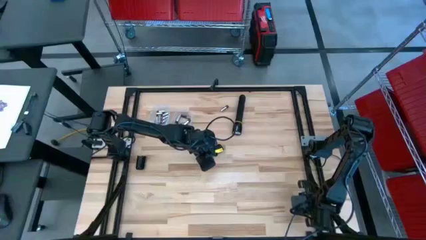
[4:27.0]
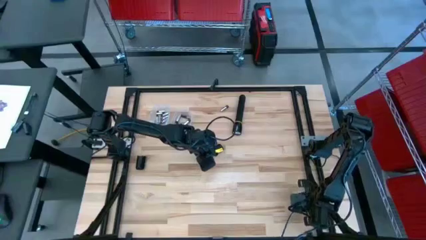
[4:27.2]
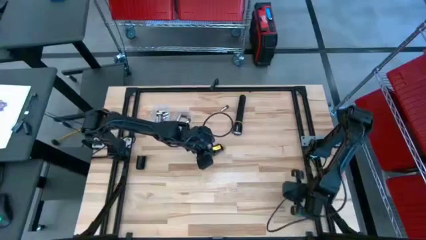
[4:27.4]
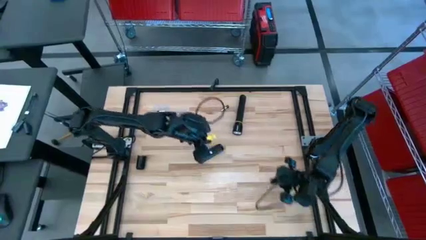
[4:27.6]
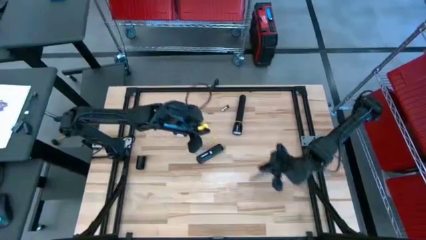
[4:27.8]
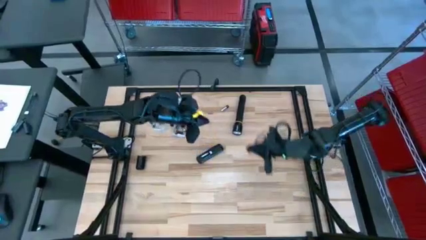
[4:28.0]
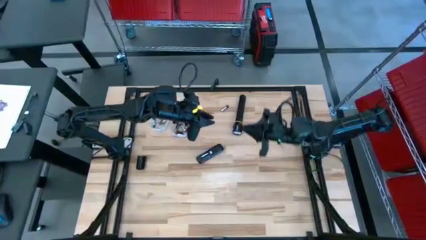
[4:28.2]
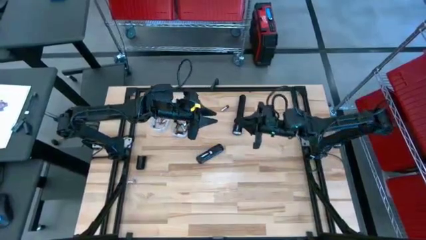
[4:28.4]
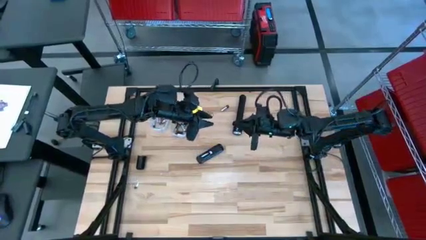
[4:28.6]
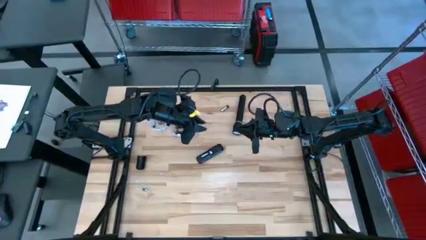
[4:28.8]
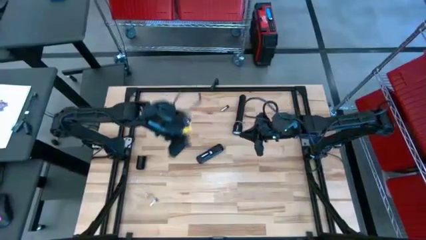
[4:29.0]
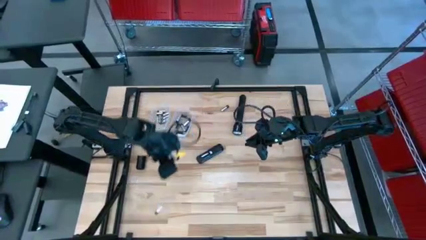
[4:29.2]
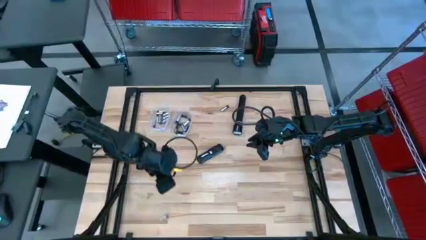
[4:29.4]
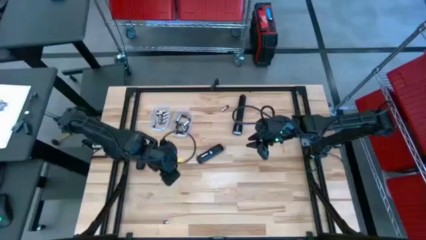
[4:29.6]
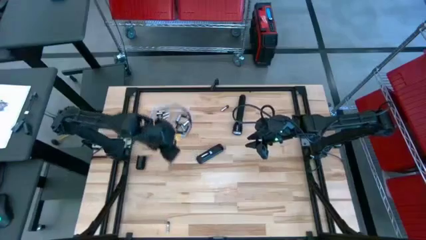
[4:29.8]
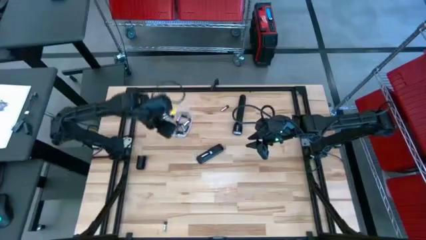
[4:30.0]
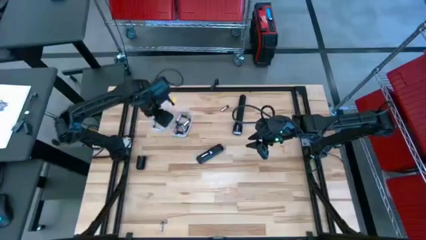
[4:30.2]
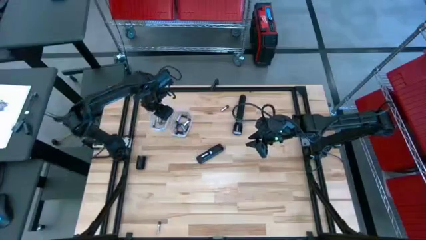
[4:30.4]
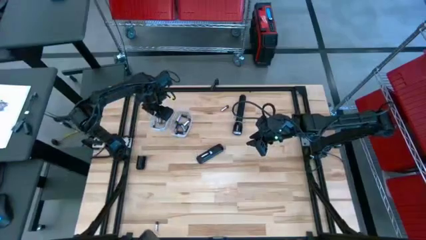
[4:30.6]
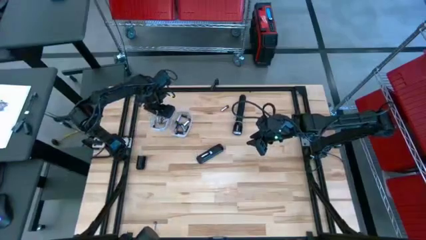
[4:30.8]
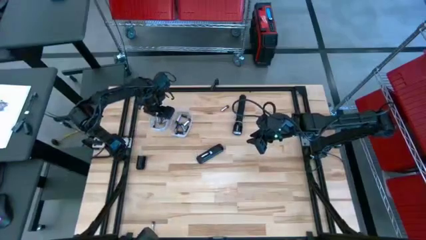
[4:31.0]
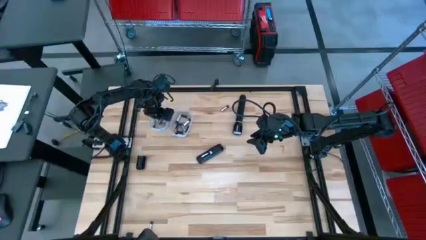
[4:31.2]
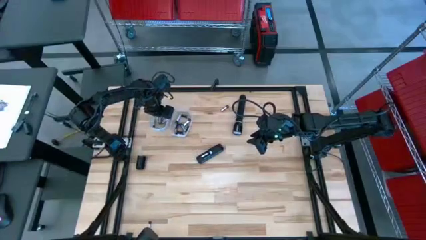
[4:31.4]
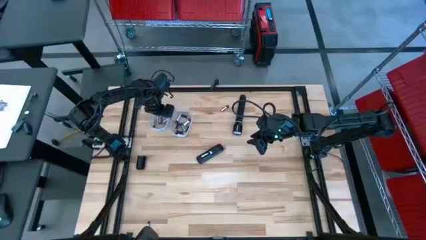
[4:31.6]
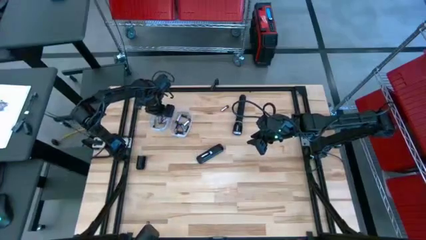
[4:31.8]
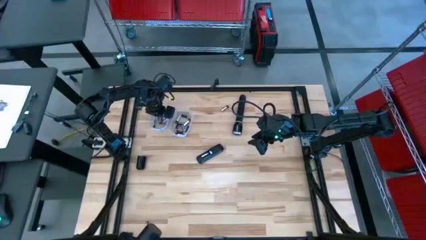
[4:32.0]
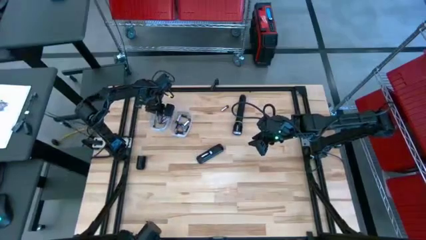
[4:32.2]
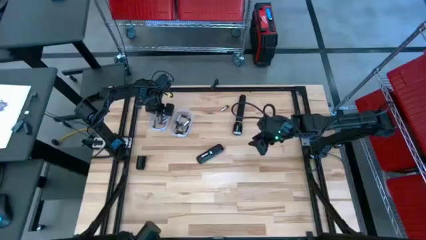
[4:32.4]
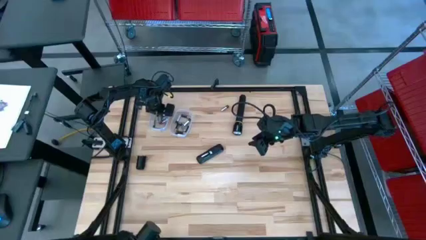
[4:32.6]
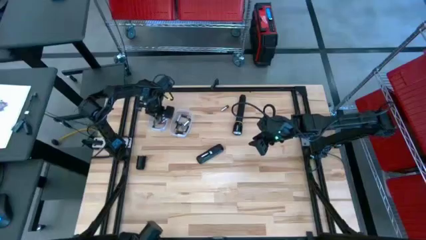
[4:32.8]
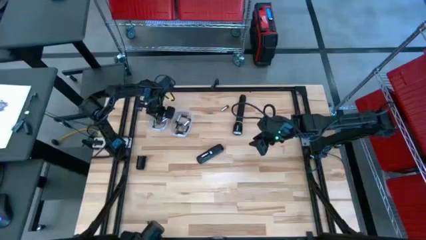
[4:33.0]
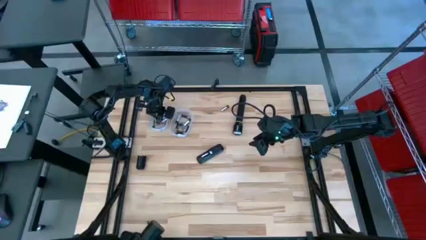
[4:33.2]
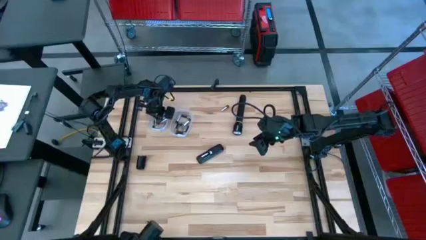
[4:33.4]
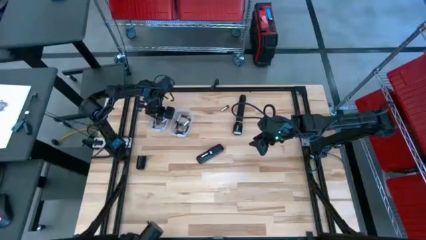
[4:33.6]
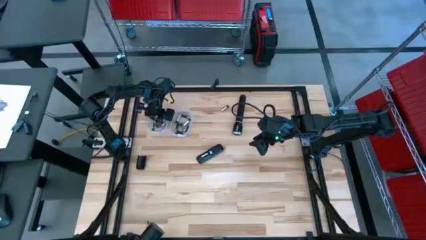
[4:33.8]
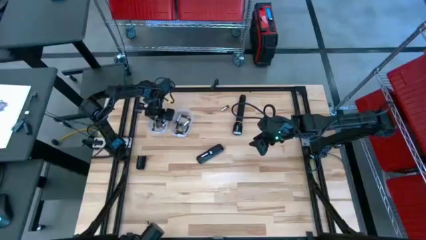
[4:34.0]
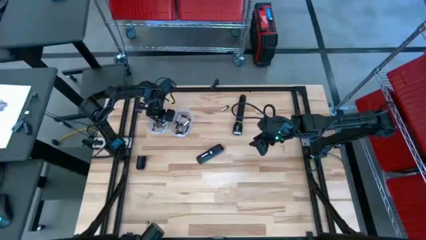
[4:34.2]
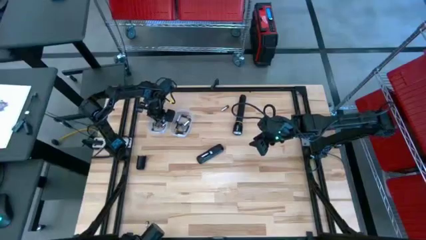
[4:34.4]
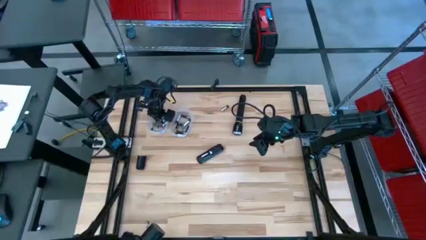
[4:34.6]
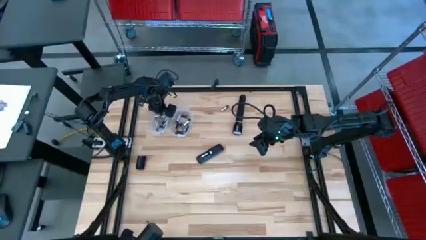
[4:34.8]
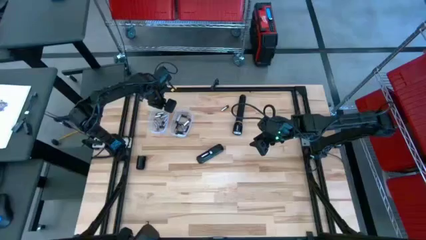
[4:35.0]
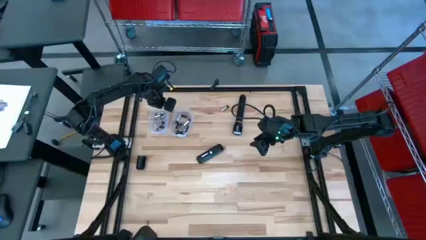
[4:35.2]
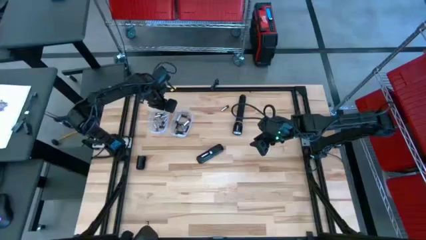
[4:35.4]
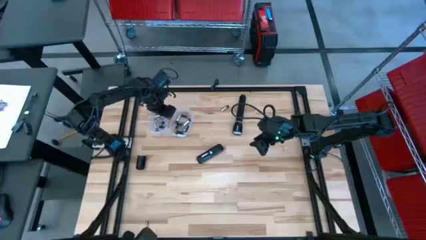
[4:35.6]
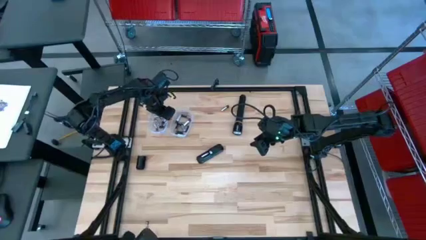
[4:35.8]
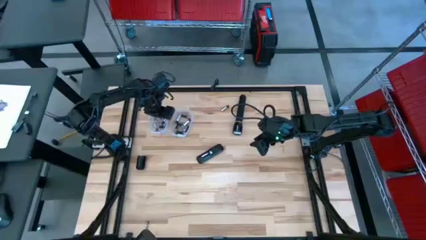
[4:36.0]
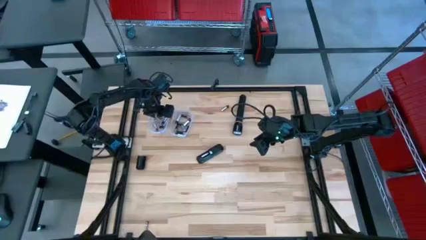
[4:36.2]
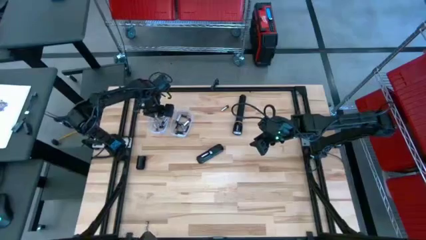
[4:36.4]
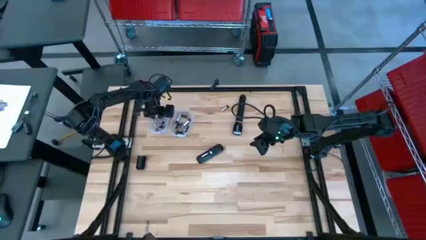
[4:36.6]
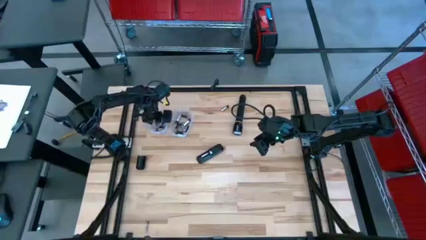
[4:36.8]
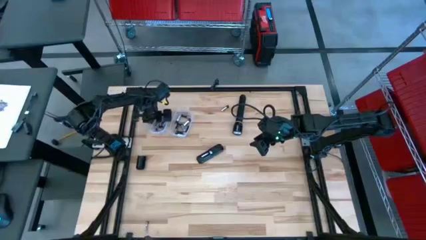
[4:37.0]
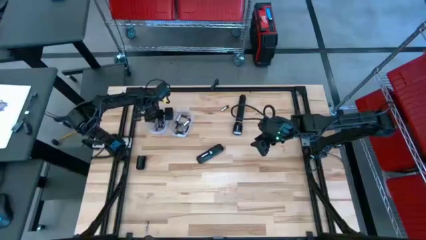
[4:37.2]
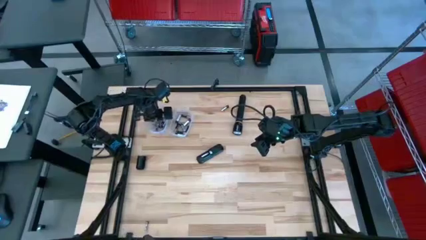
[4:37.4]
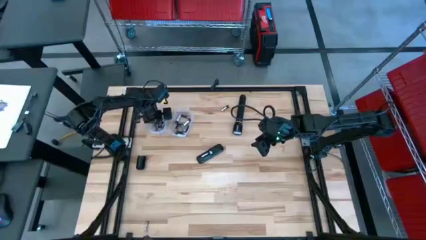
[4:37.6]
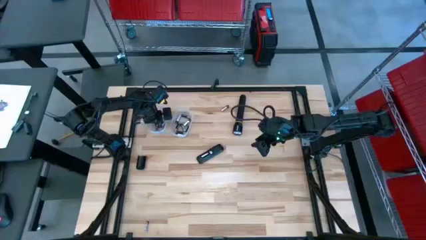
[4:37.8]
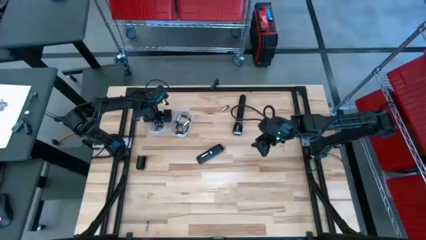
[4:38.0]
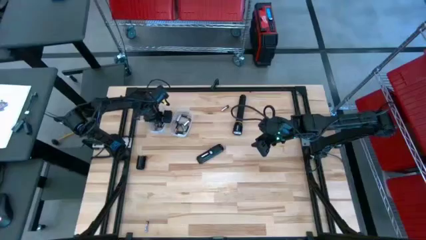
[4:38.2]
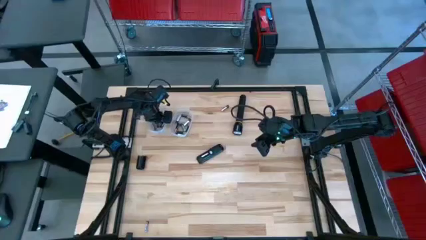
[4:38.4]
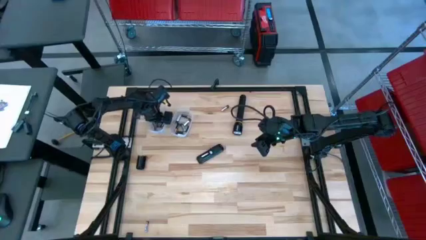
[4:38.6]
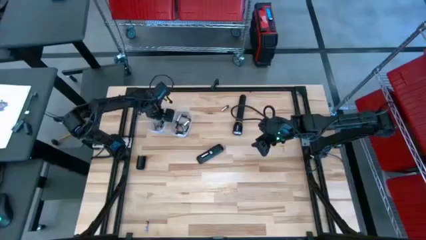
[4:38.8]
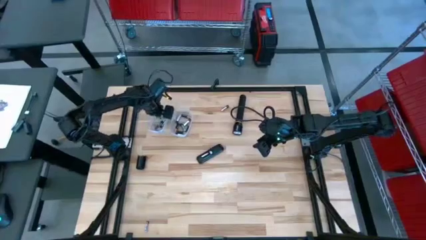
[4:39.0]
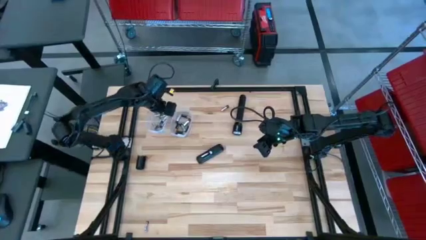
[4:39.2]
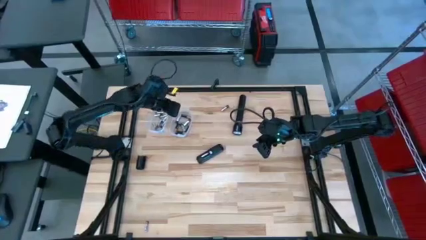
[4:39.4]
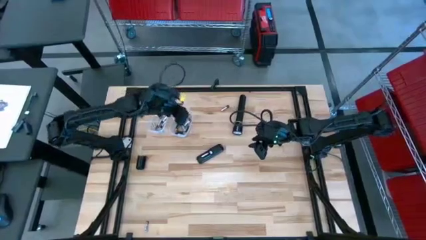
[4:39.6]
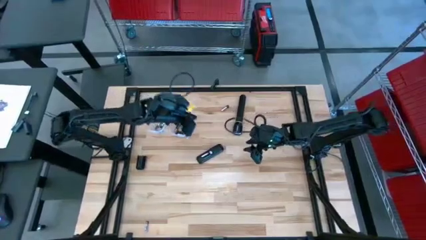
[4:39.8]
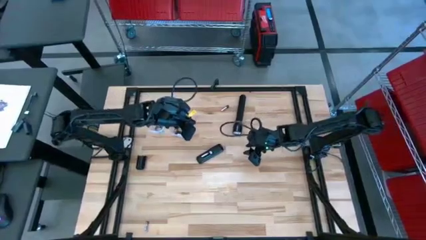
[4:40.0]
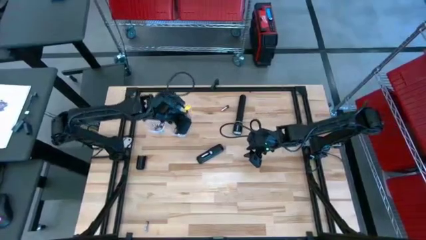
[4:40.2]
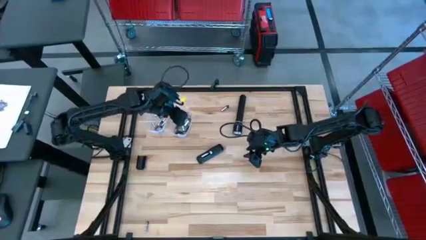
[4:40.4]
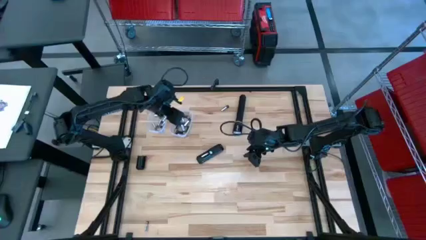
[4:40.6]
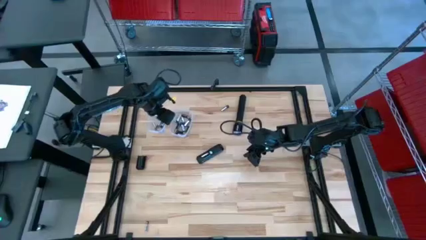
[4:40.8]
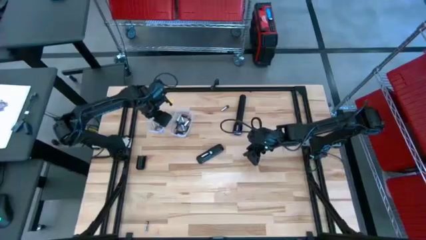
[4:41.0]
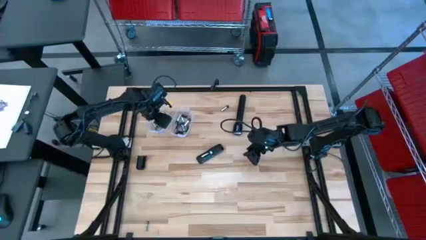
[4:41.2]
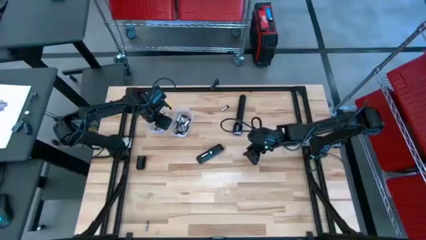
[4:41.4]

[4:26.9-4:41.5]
Task: Insert battery
Insert the silver battery into the remote control battery compartment

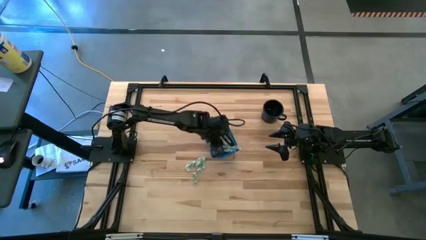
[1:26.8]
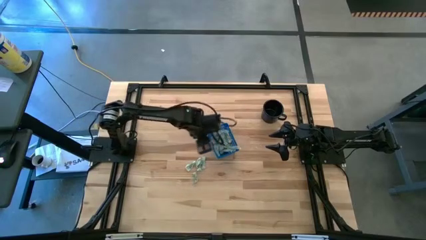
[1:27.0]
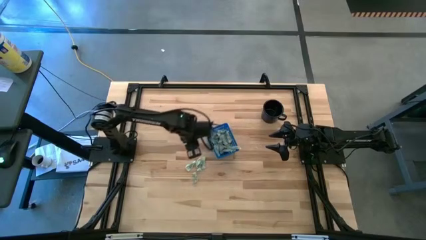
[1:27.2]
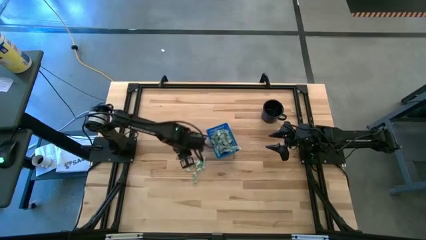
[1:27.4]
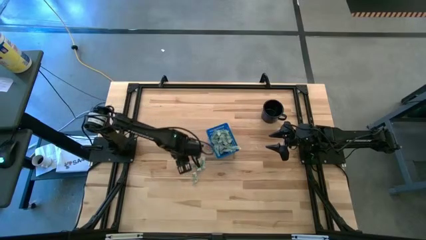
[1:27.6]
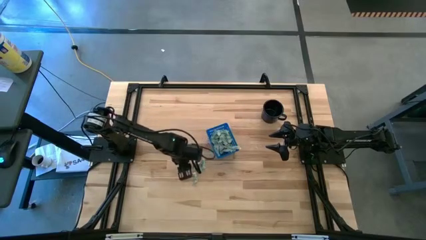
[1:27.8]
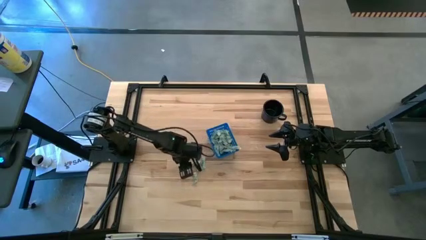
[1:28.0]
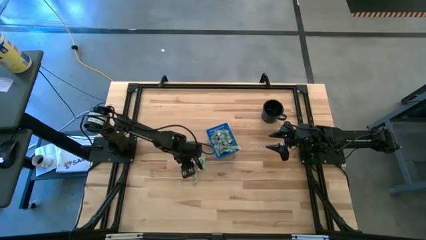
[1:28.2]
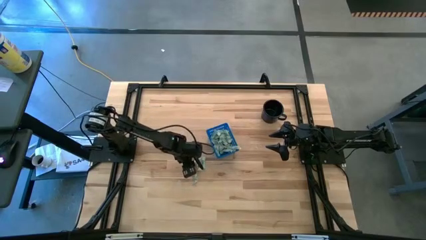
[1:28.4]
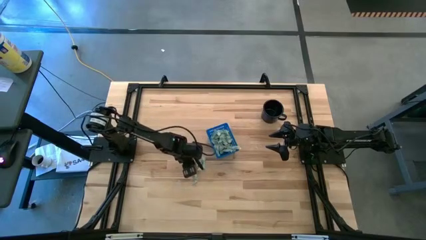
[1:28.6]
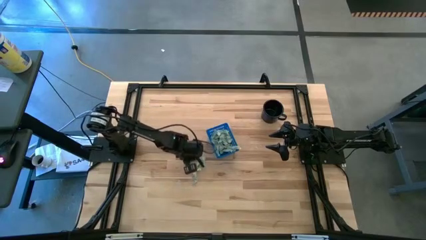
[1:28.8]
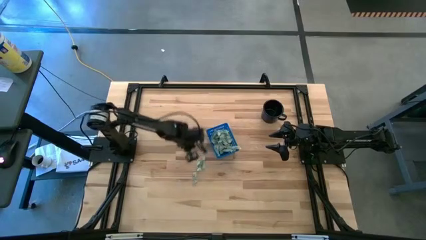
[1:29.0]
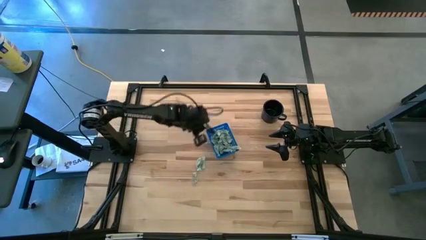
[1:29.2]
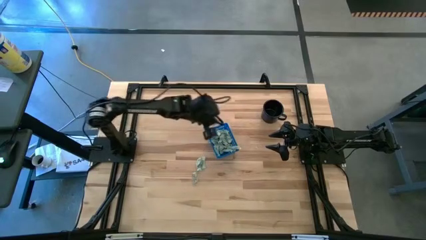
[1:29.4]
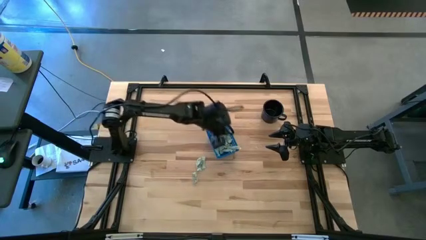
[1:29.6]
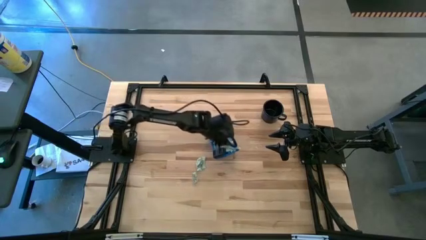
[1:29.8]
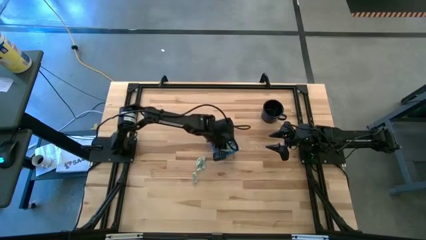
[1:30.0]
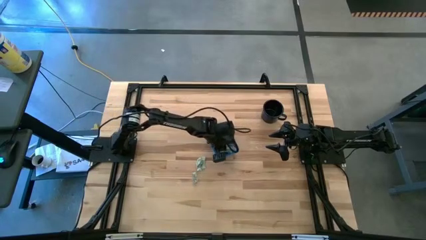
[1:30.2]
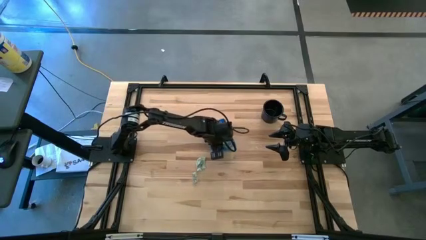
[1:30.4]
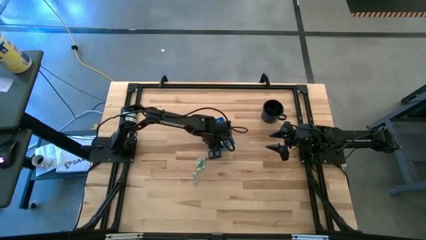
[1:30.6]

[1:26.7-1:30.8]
Task: Pick and place Stevia / Truvia into bins
Put the stevia packet into the basket
